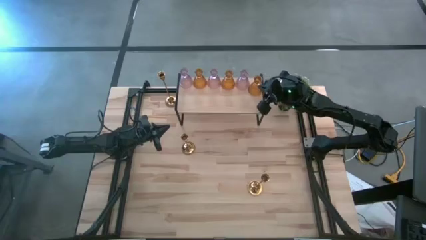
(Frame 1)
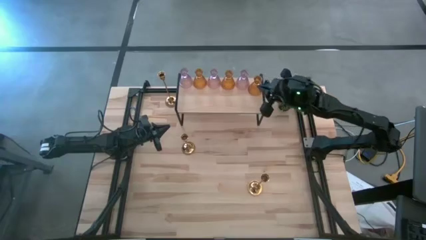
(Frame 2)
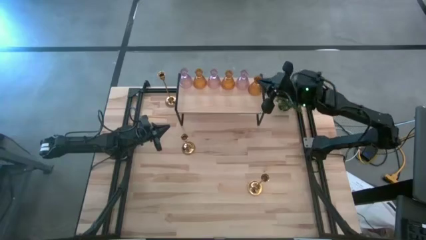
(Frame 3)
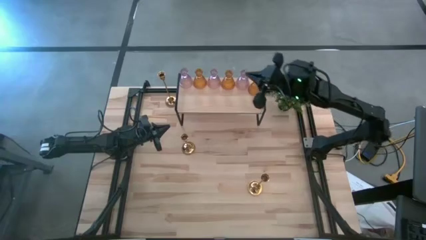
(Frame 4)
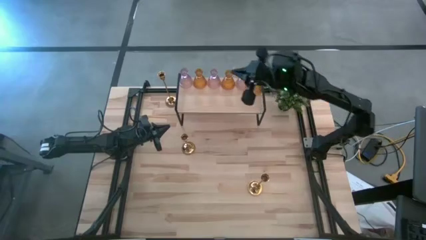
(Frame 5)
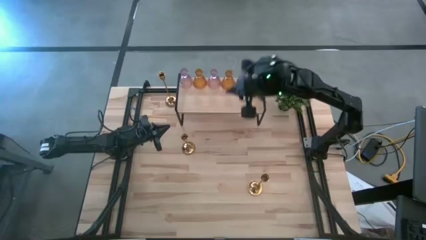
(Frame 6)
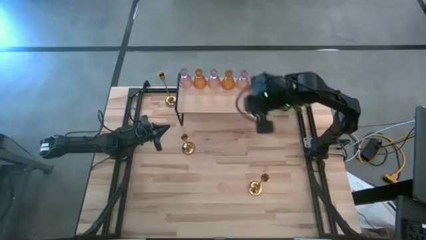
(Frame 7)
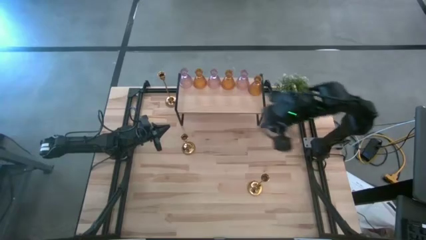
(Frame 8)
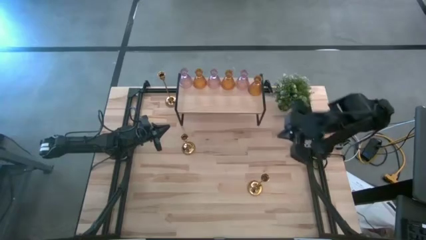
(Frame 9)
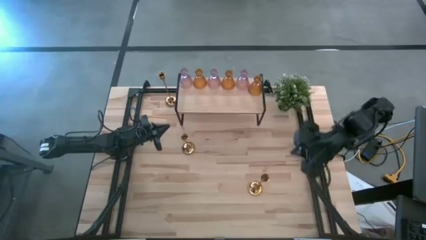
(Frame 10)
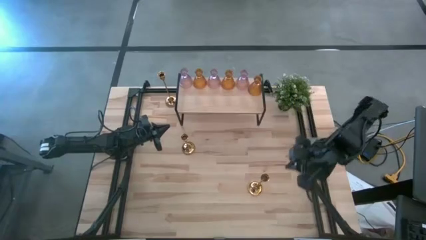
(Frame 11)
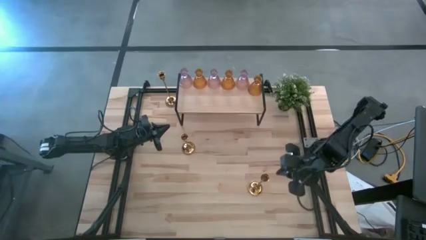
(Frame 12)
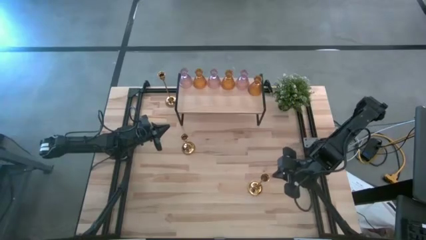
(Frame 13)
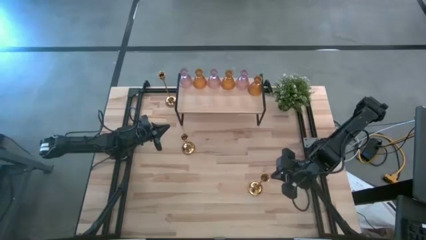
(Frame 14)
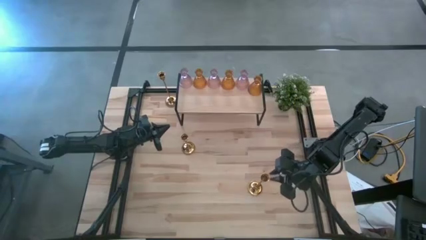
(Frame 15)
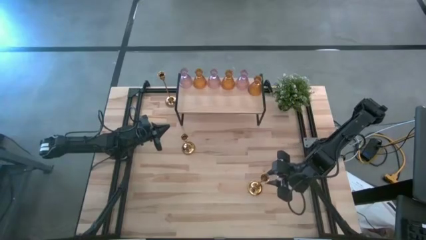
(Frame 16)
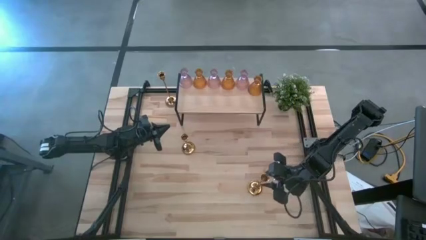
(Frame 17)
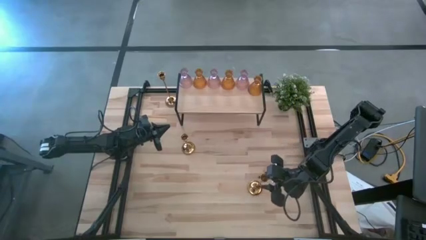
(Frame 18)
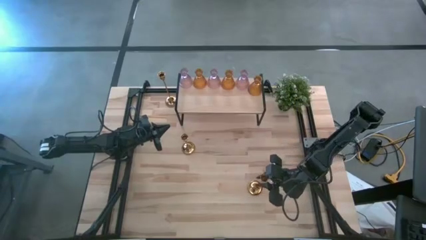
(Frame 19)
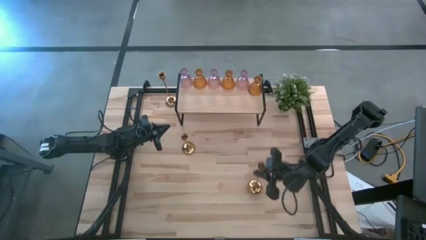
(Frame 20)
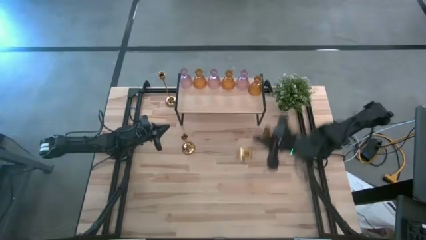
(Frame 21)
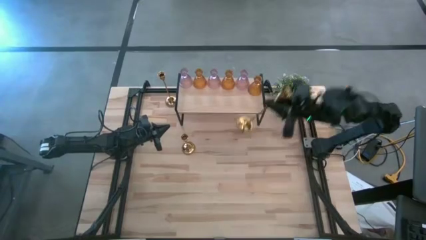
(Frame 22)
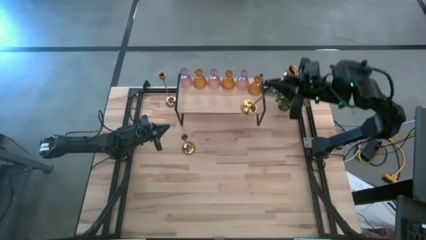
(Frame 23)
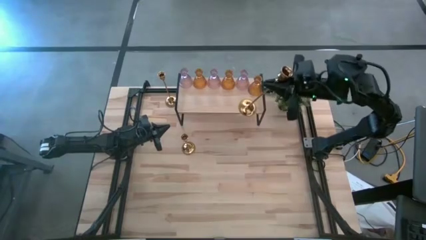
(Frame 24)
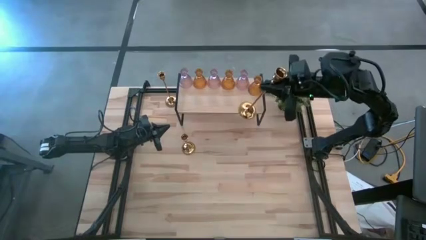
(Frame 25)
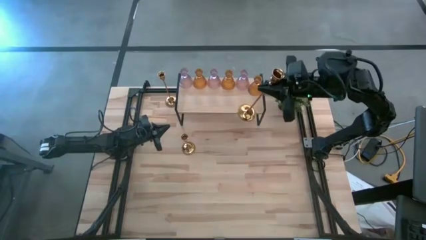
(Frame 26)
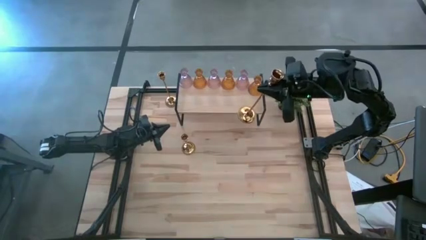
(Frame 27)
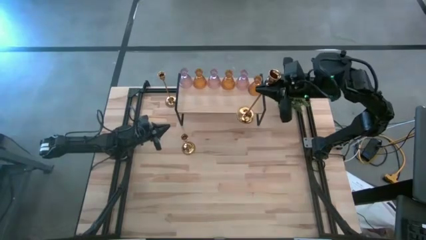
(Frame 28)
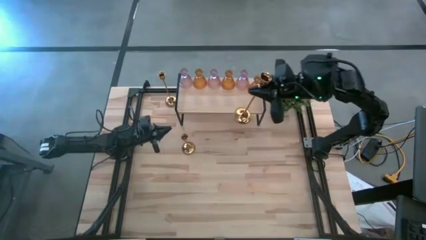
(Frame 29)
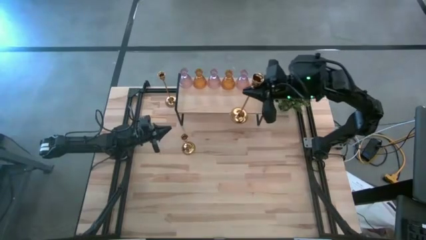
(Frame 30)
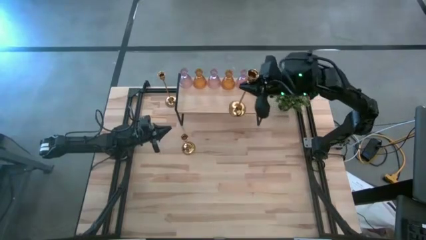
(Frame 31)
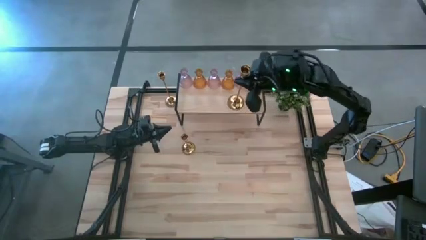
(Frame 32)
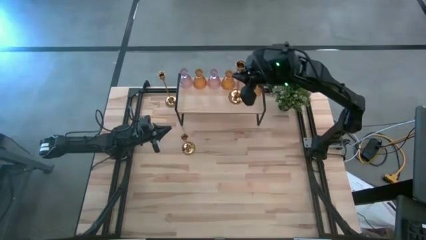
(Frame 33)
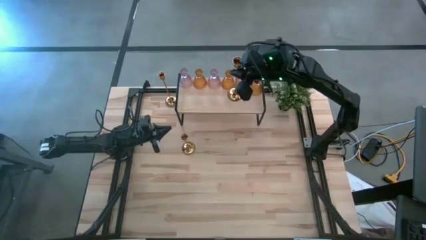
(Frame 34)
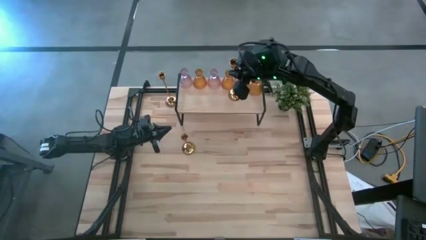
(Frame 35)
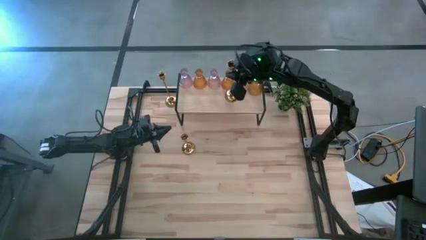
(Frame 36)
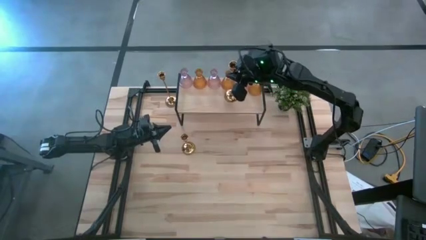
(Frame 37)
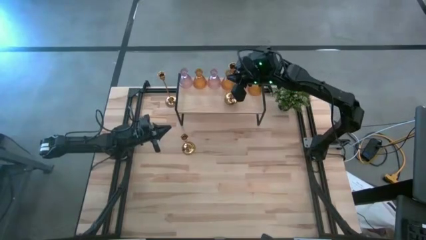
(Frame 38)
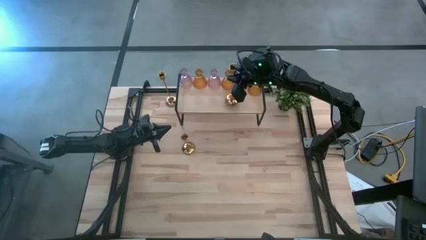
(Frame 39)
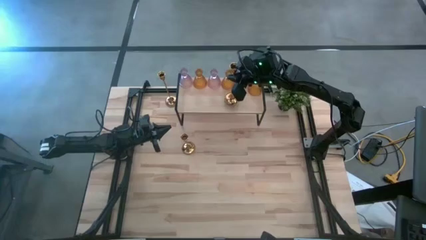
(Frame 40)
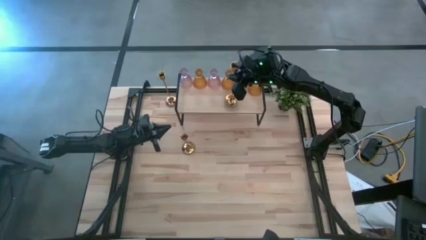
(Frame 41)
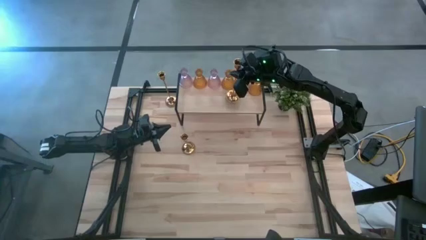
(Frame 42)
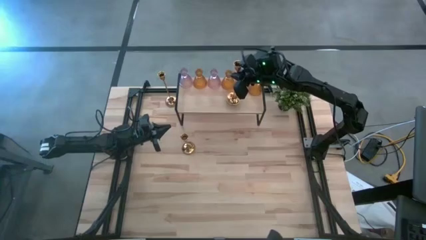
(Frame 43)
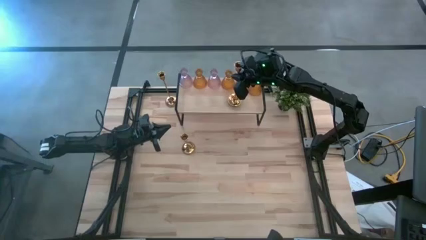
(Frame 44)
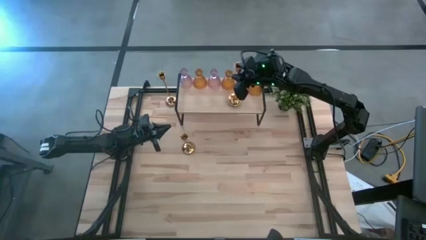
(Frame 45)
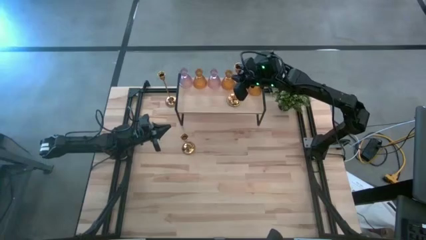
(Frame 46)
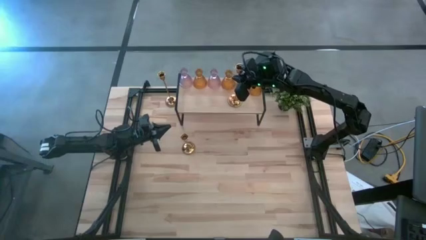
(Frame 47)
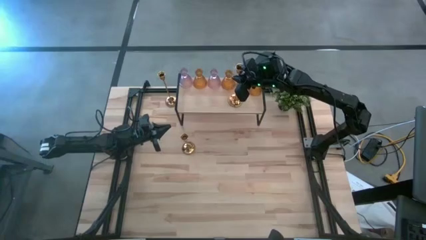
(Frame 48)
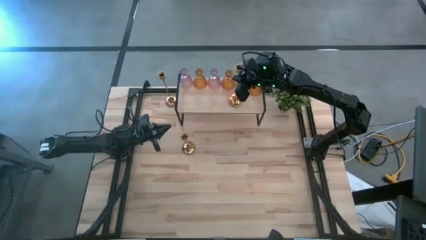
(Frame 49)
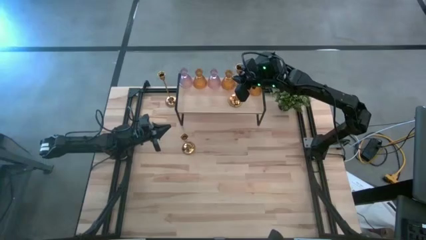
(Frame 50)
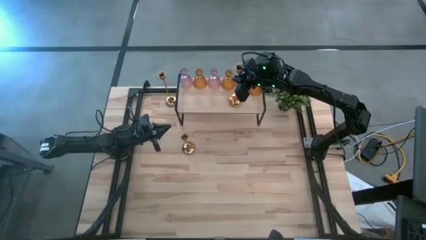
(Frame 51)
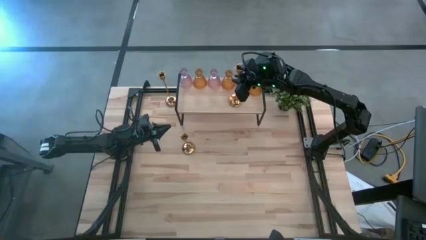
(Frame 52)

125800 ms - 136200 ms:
Task: Pick & Place candle stick holders
Put the bottom gold candle holder on the shelf

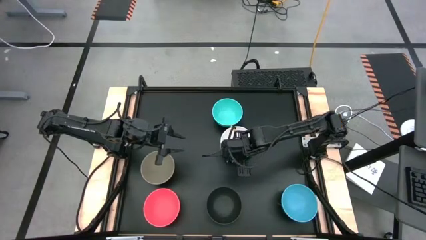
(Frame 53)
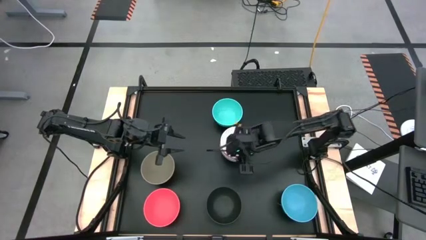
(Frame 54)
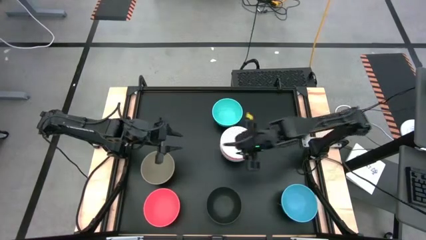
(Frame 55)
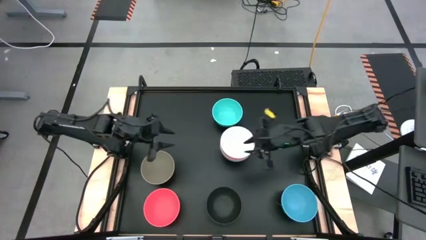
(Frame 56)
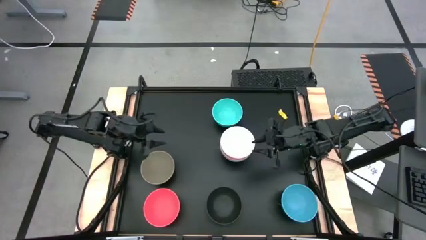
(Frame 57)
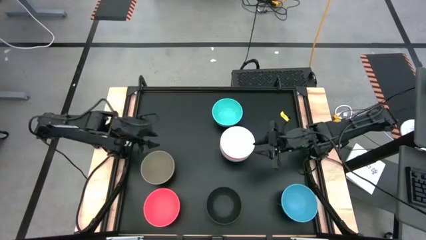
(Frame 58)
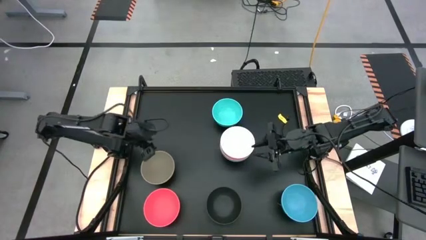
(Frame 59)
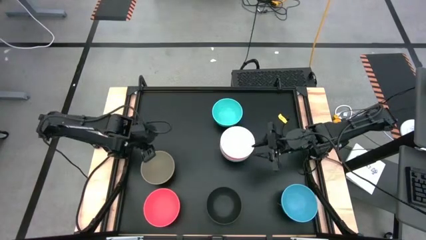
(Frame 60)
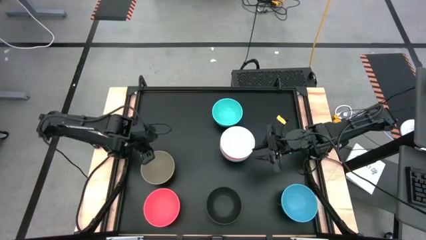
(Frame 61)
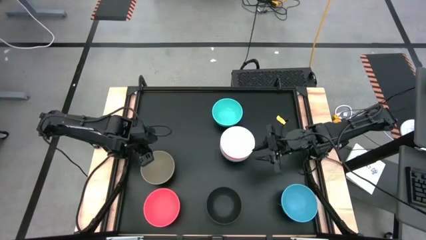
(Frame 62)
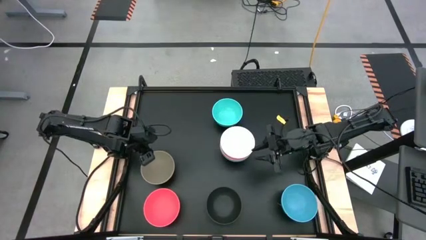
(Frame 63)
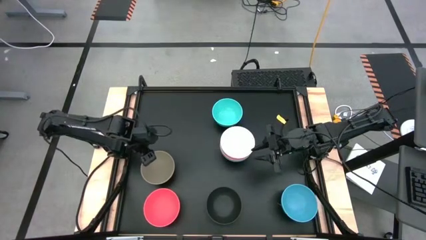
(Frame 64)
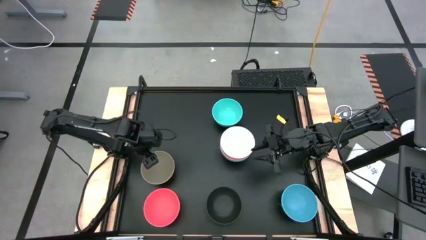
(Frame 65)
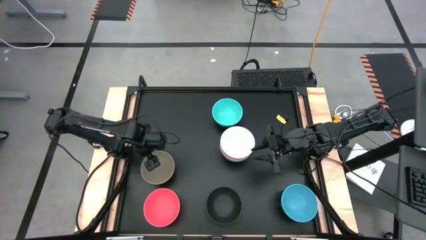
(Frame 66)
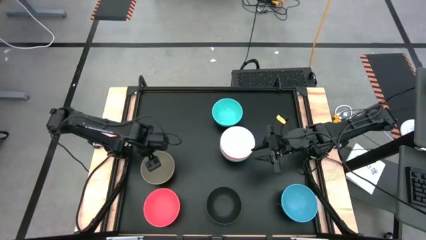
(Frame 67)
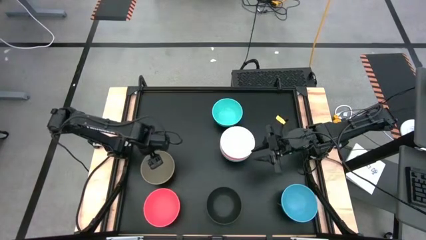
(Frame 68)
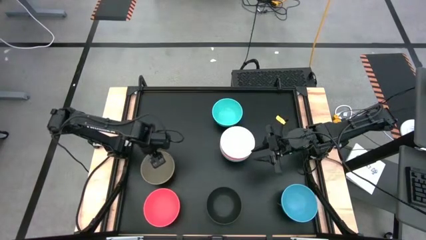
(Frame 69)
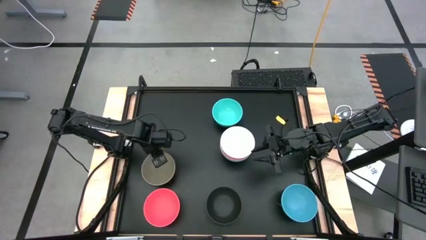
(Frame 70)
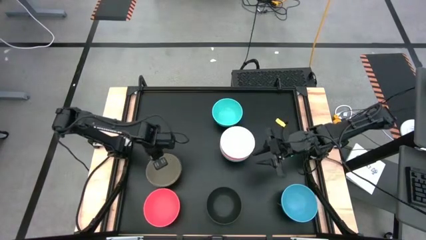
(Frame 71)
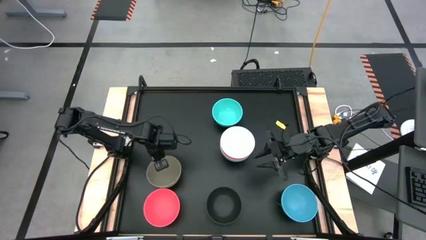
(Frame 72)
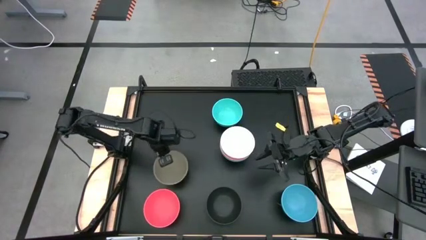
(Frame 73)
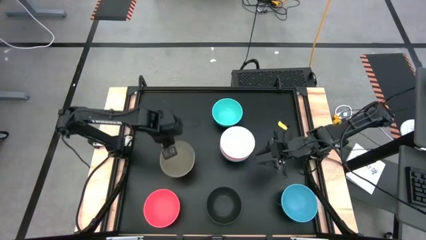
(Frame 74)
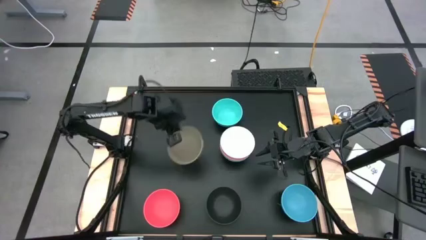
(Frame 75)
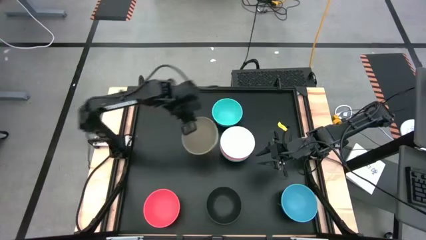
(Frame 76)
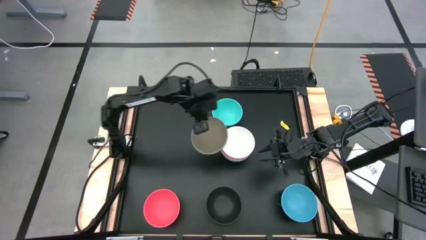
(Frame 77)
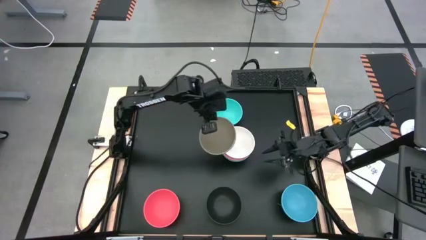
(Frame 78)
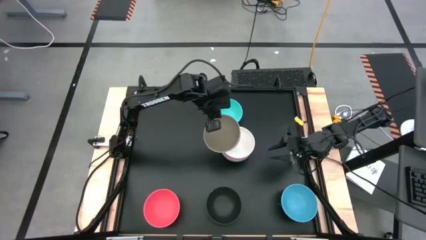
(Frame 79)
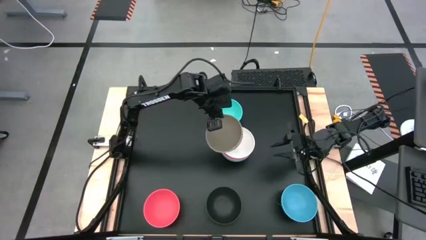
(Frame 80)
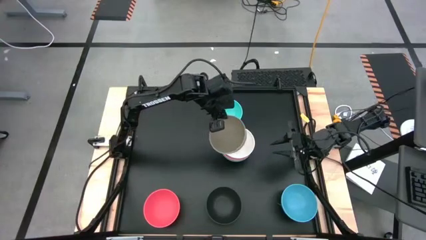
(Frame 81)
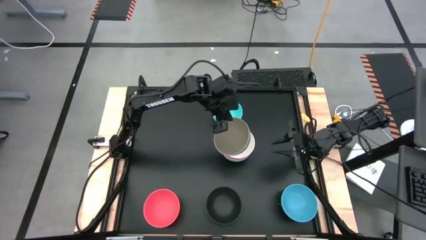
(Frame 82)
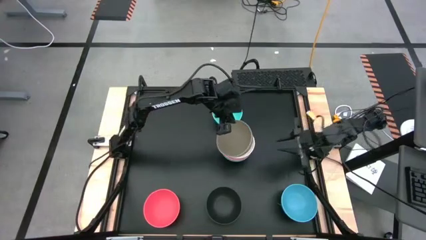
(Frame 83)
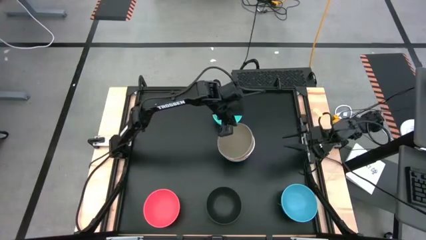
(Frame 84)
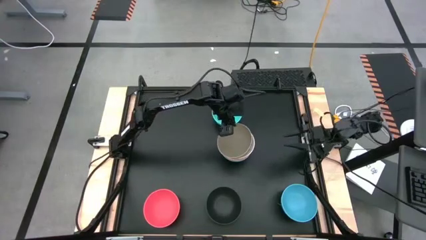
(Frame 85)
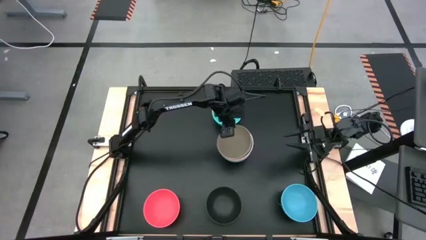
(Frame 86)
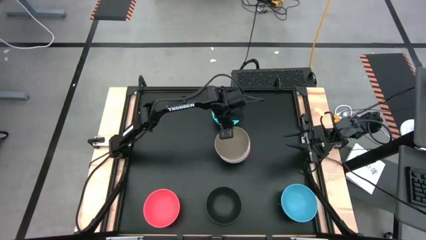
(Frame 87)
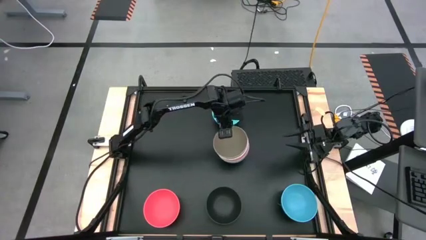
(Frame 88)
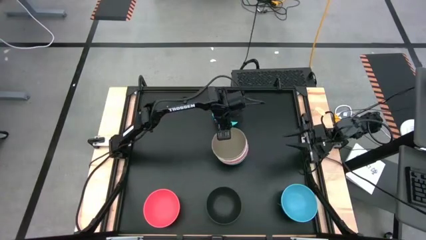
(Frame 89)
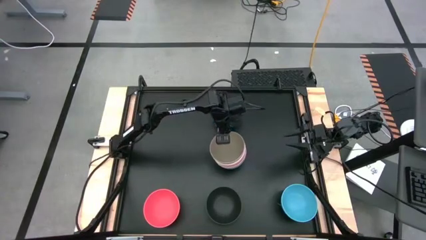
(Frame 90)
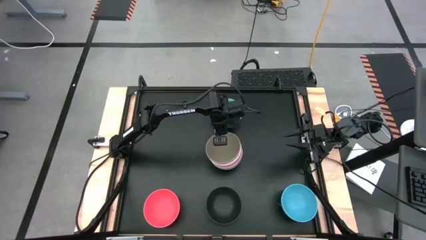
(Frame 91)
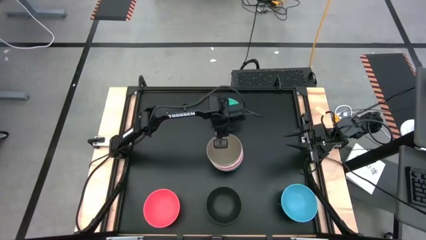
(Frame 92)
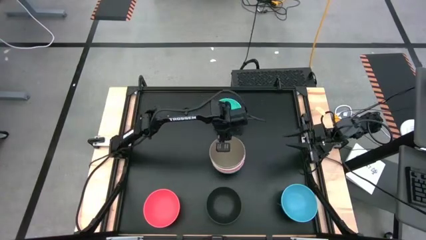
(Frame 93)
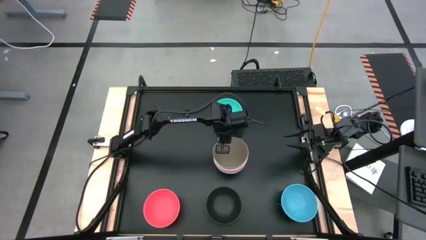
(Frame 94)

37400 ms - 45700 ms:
Task: Nest bowls inside each other
Stack the gray bowl on top of the white bowl
